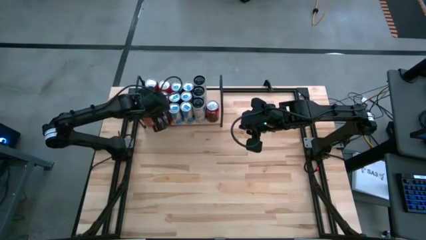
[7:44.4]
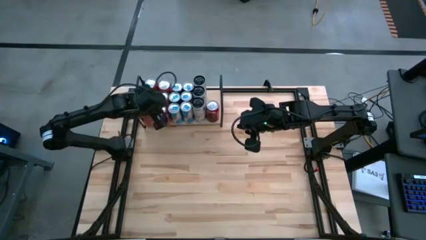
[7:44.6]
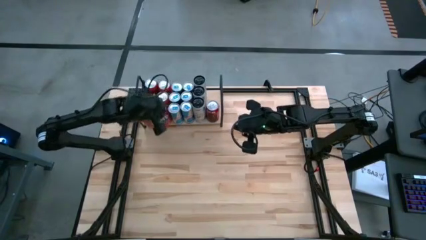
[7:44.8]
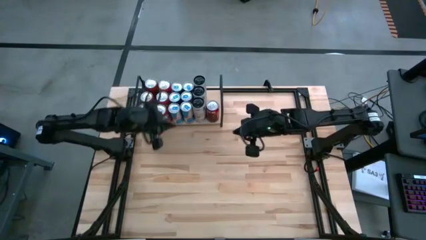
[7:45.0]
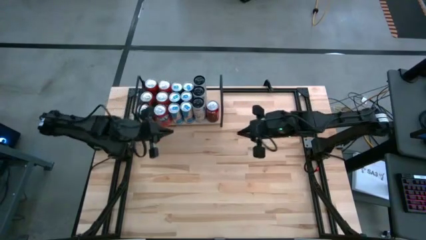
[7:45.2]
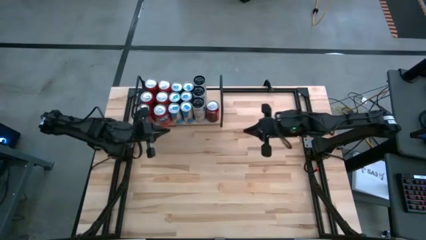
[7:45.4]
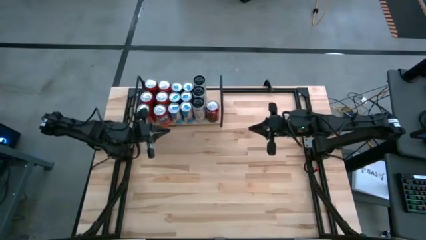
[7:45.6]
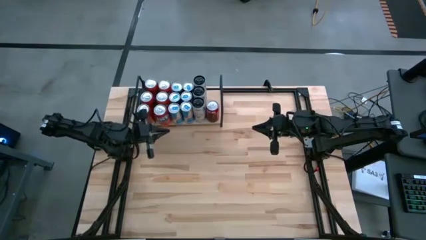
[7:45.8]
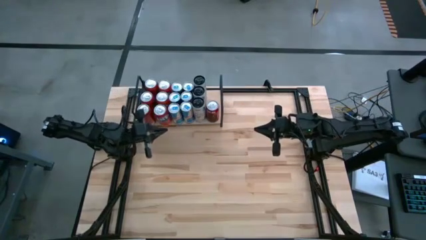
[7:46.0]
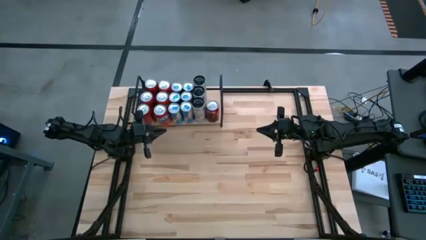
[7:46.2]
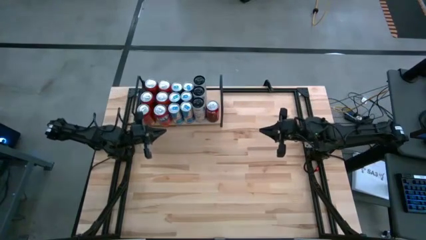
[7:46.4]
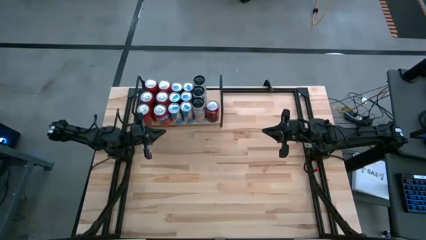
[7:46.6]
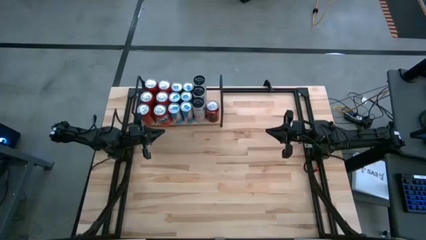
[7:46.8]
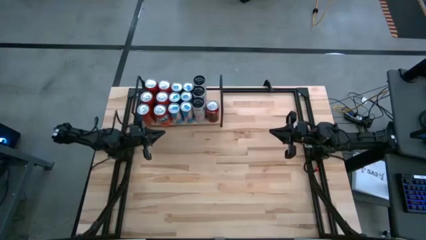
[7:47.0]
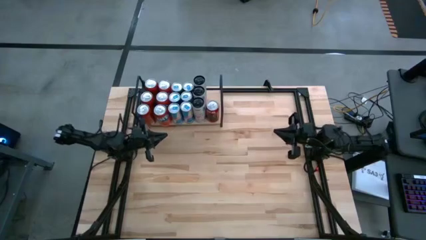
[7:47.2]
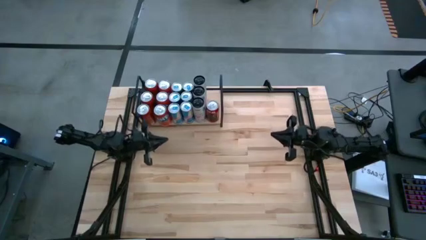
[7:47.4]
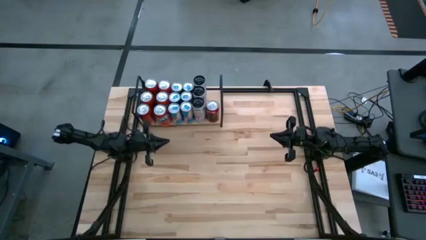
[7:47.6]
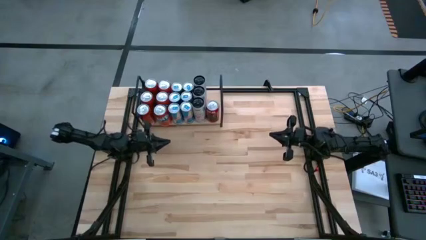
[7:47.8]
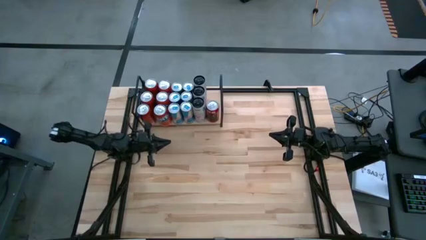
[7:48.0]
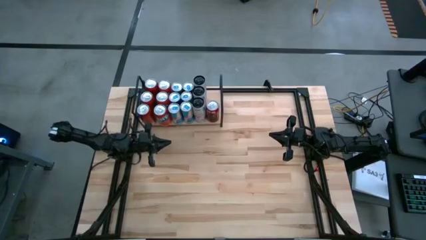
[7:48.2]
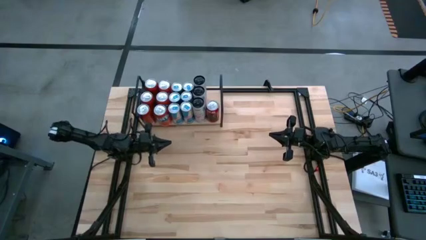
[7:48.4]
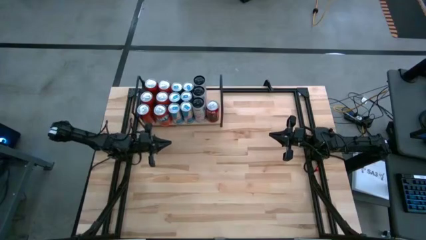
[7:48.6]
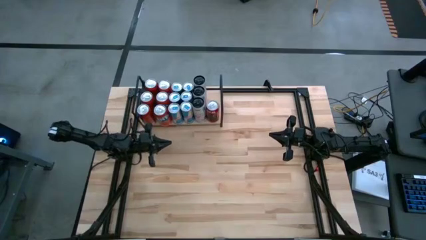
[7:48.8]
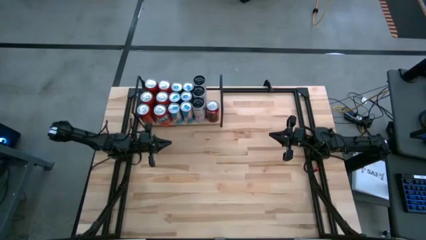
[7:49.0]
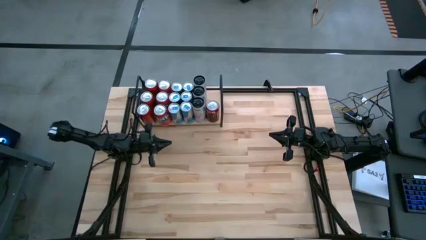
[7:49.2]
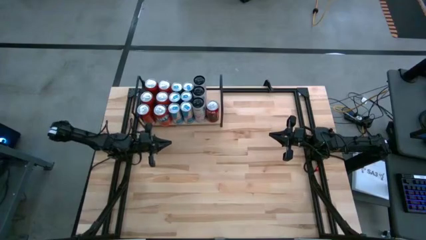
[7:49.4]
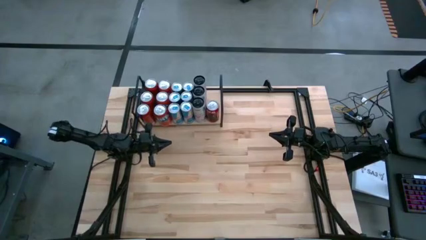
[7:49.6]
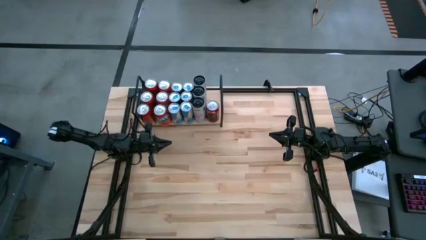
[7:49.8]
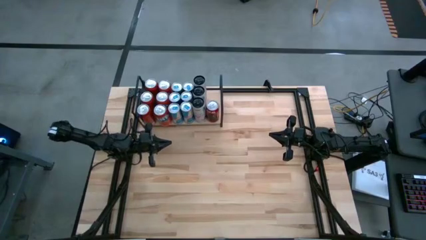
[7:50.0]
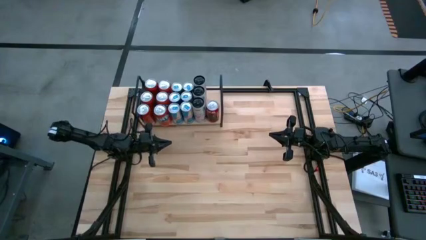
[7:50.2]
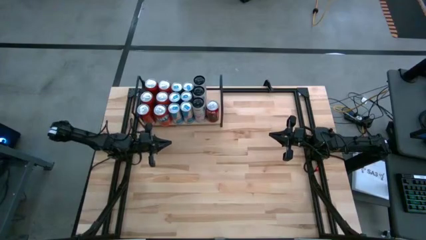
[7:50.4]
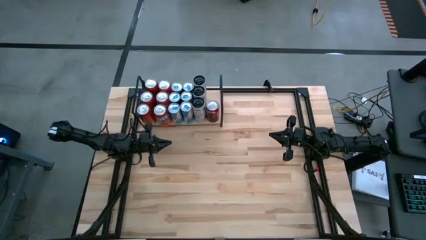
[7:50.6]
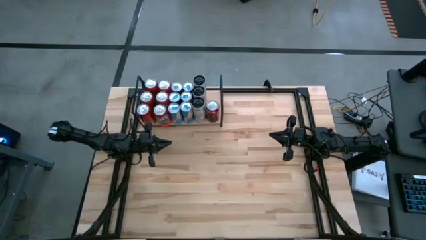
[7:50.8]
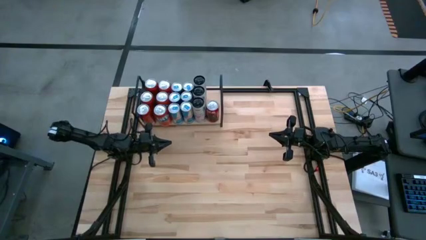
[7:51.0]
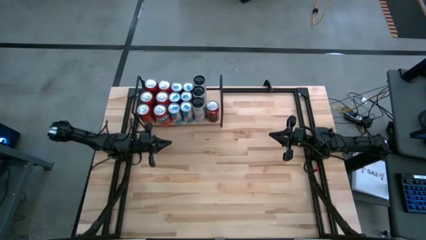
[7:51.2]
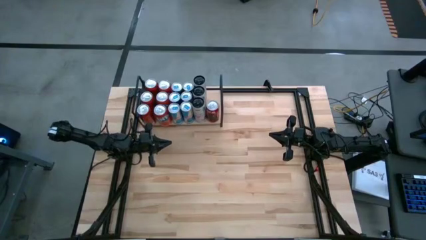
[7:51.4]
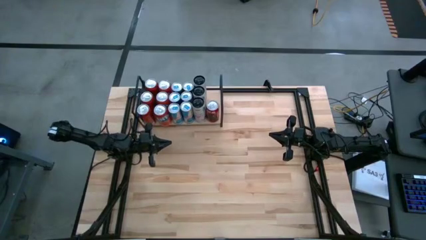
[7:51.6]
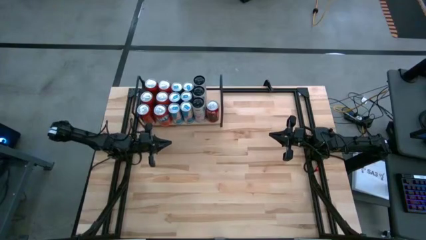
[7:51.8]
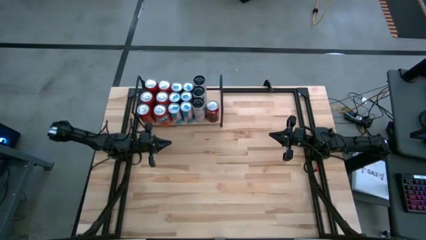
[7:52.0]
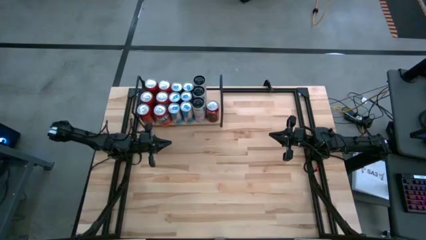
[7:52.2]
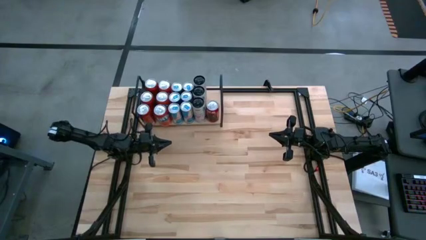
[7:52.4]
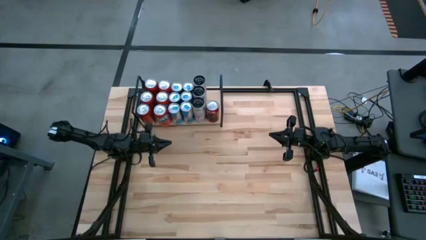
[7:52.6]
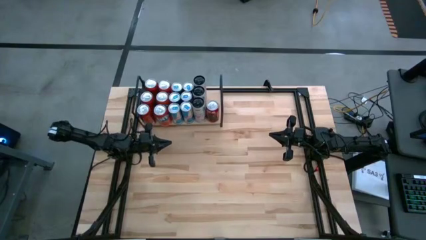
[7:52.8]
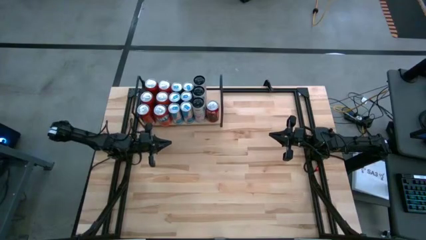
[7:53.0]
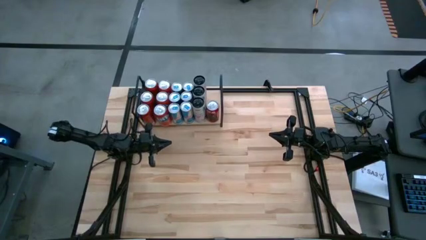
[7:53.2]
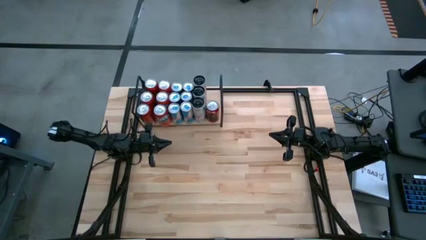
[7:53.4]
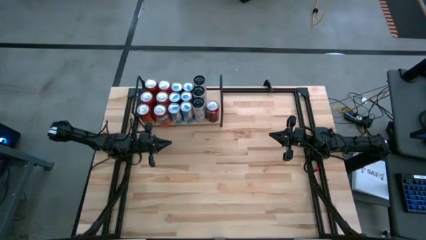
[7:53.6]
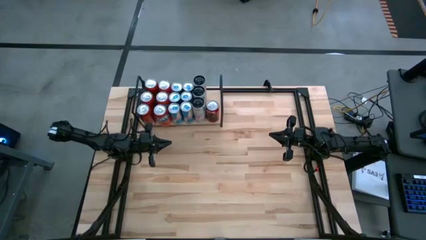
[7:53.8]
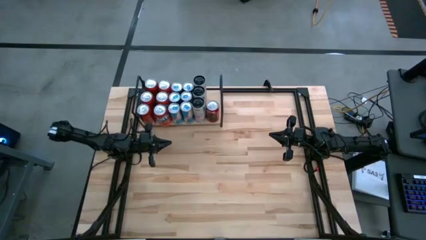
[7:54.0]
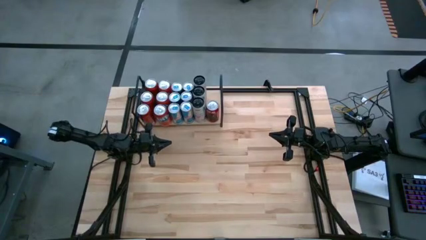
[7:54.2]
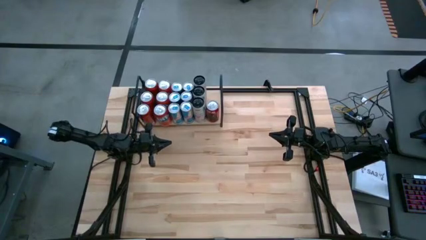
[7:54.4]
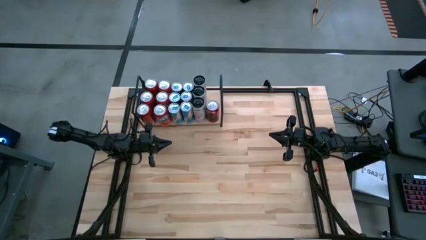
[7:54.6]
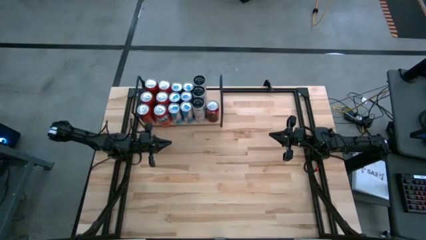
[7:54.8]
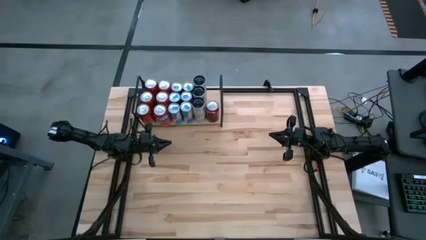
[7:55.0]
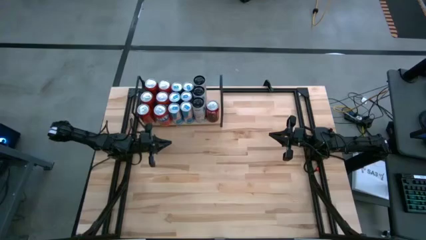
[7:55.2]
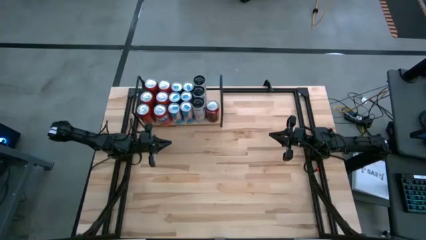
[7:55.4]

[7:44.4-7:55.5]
Task: Place canned beverage on shelf
Return to Home Position
